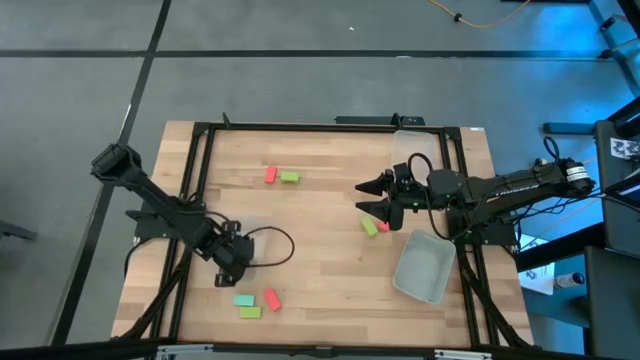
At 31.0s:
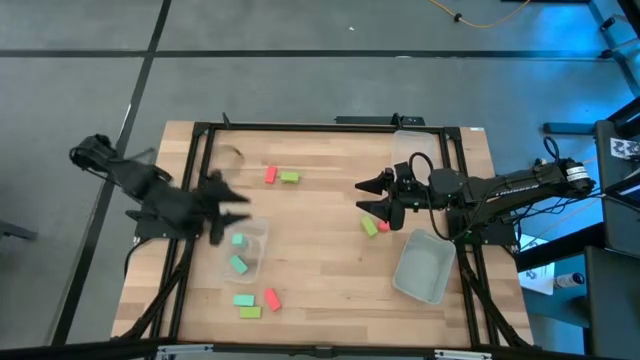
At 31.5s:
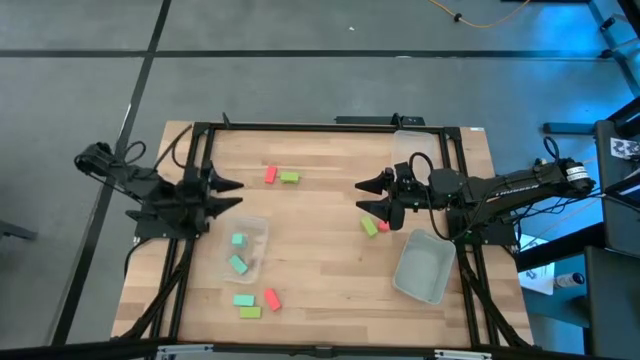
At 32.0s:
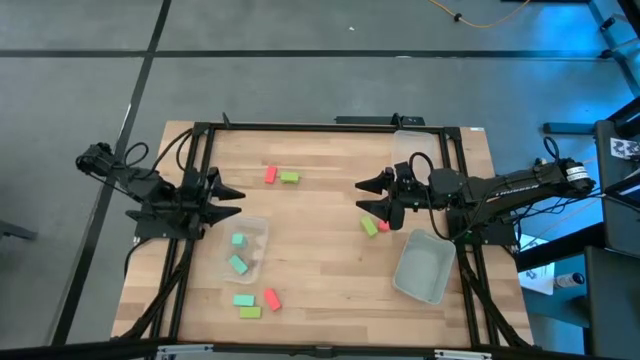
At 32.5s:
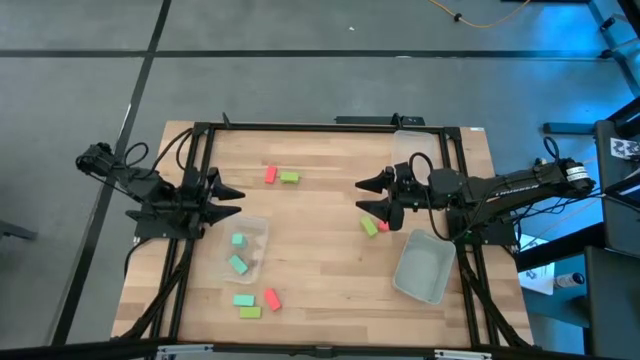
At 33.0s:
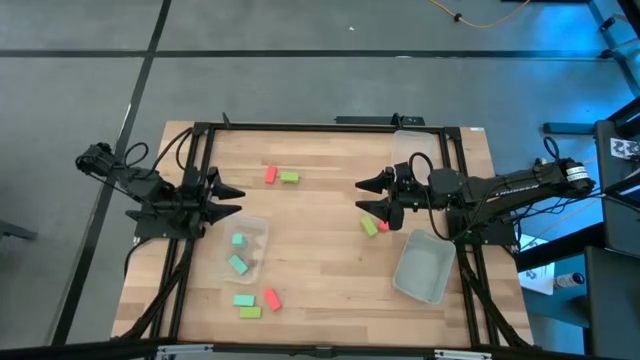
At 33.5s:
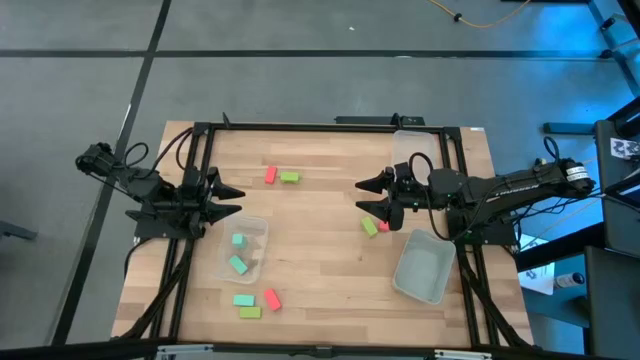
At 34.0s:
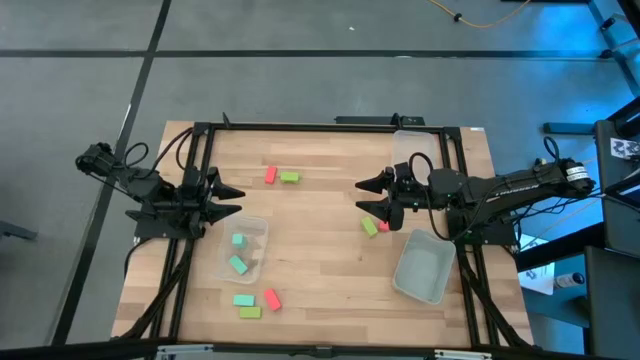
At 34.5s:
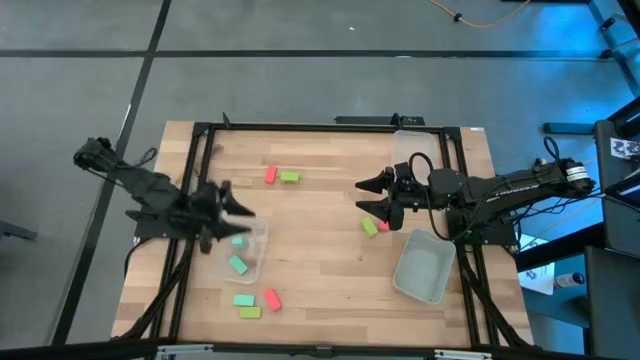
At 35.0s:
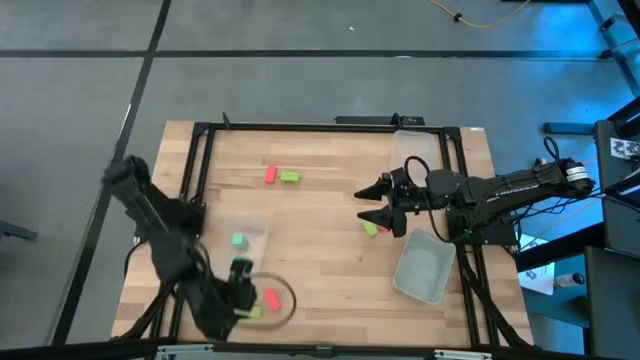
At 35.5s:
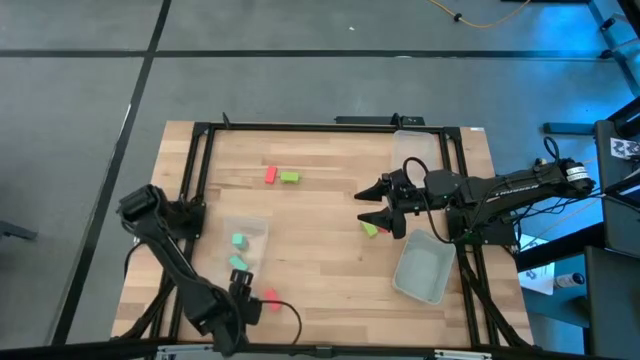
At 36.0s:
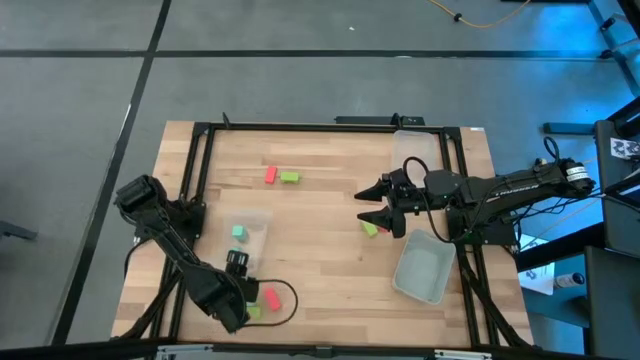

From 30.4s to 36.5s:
Task: Sort & place blocks by color
Adjust the left transparent bin

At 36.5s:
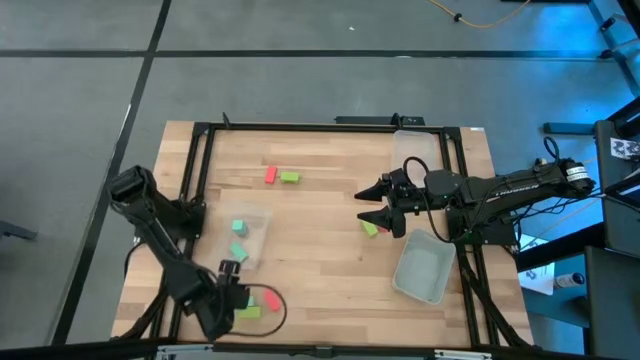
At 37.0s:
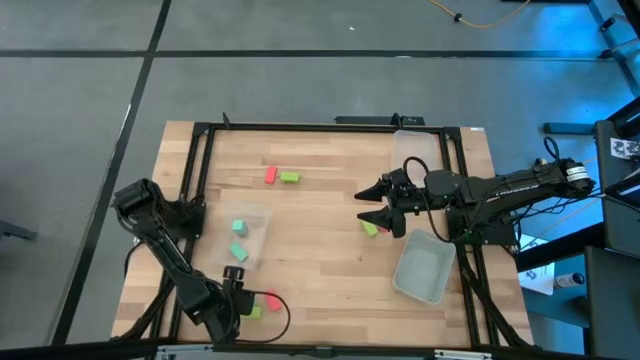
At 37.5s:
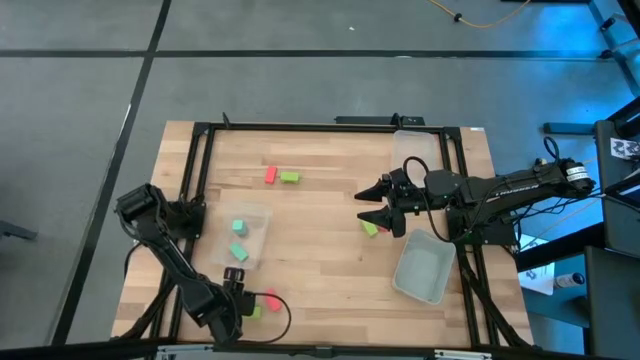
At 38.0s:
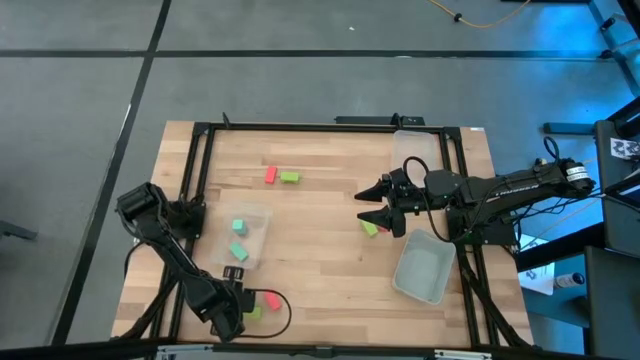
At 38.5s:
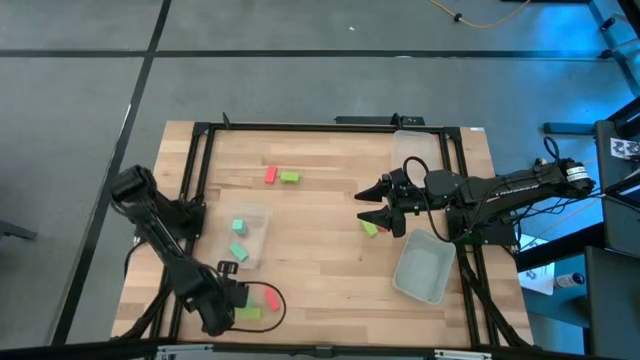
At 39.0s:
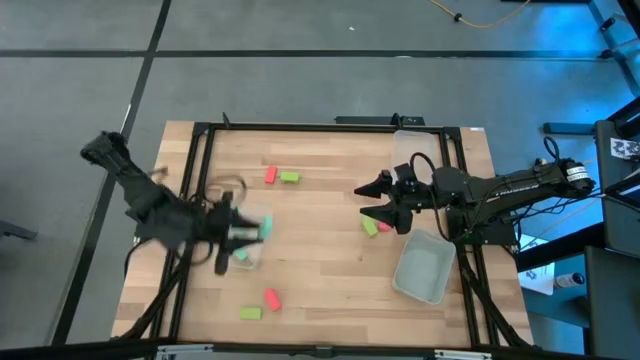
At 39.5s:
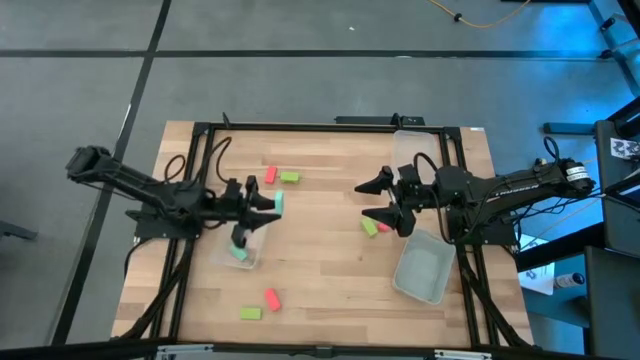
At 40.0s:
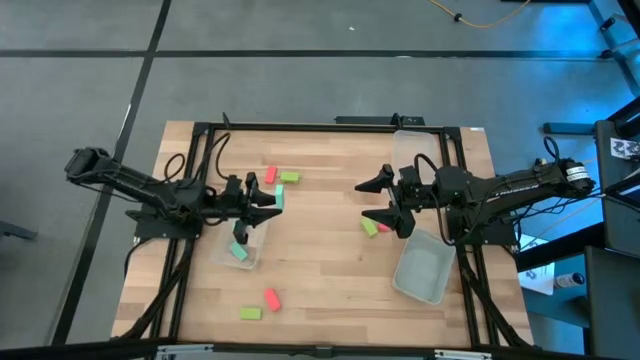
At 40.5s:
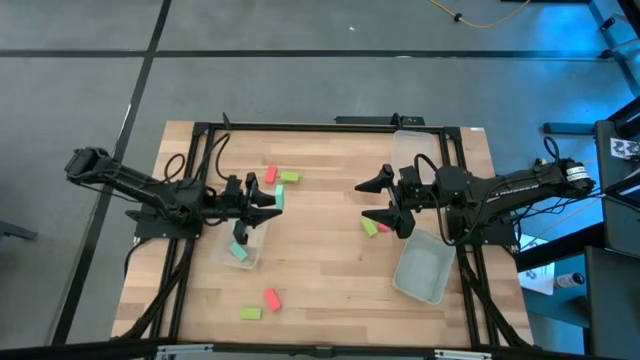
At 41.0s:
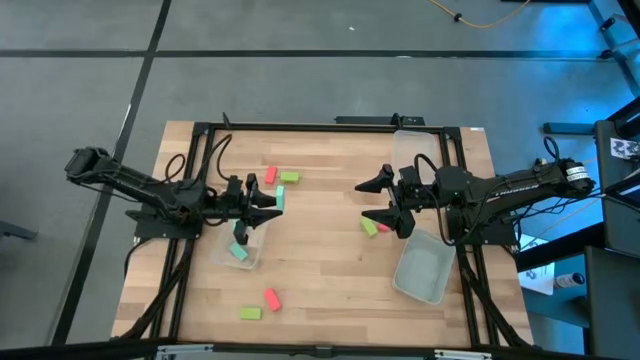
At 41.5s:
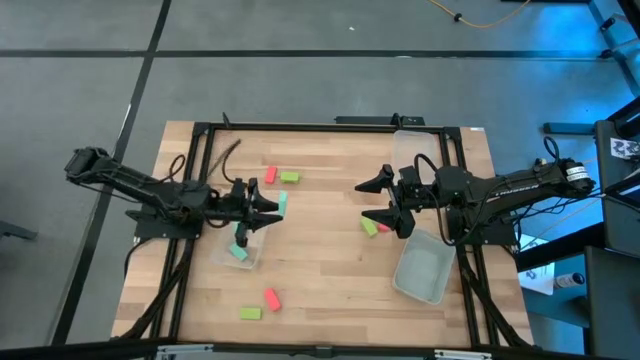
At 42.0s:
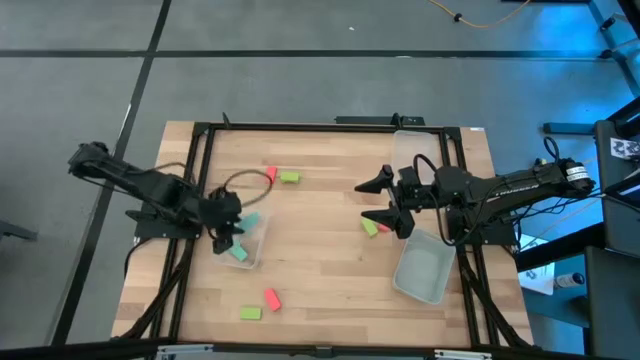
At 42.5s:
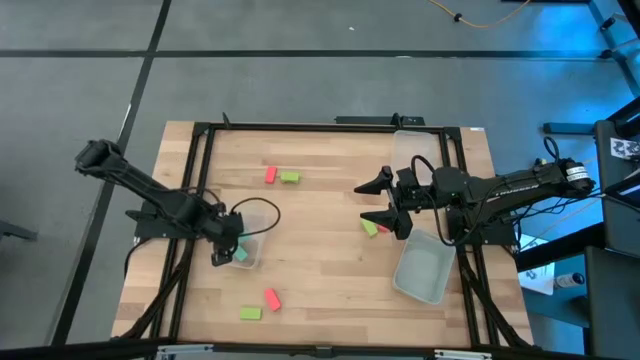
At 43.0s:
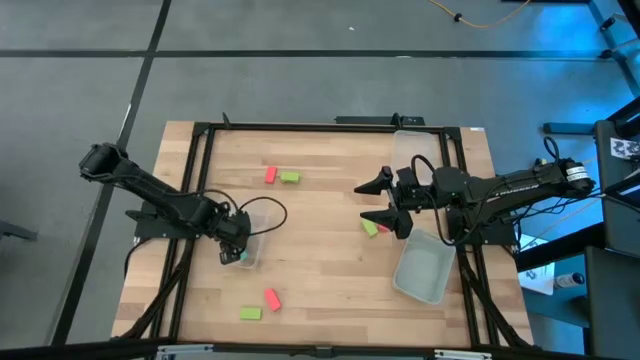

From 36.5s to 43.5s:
Put the blue block into the left transparent bin

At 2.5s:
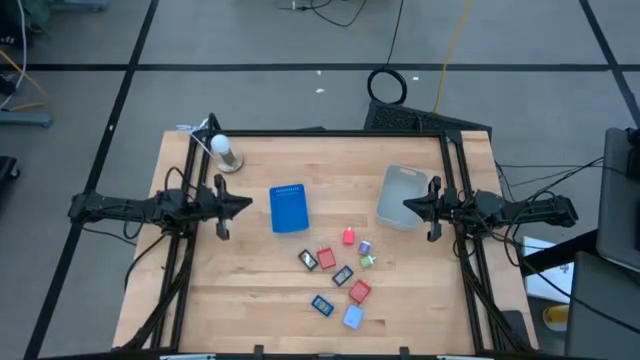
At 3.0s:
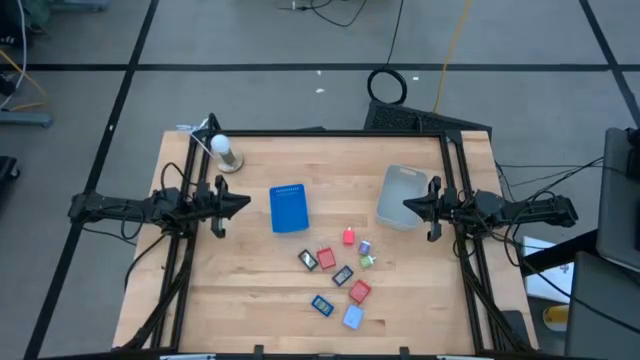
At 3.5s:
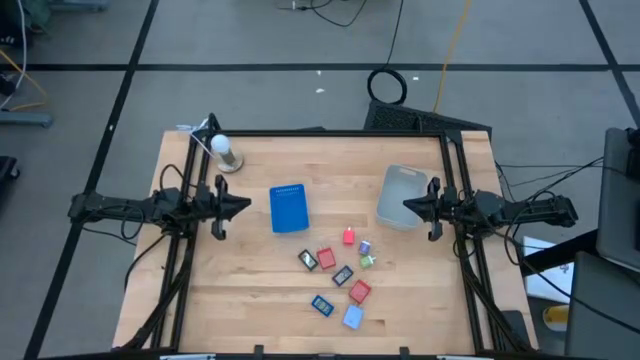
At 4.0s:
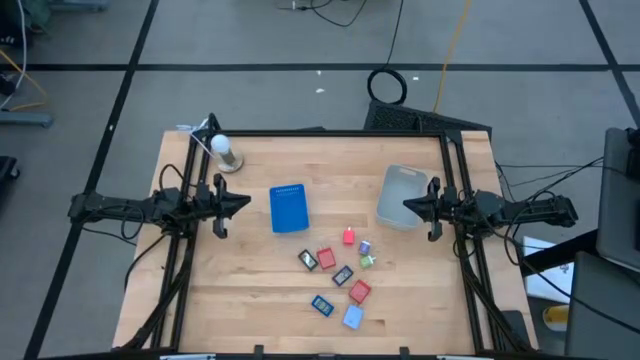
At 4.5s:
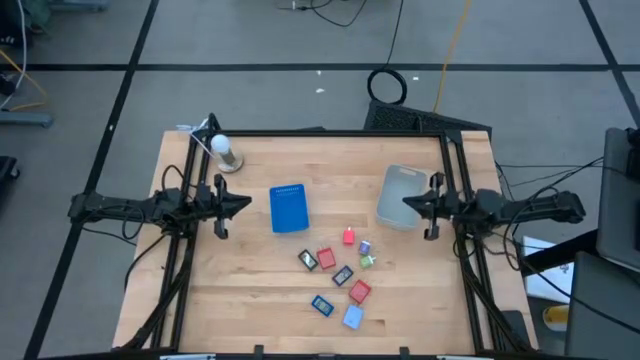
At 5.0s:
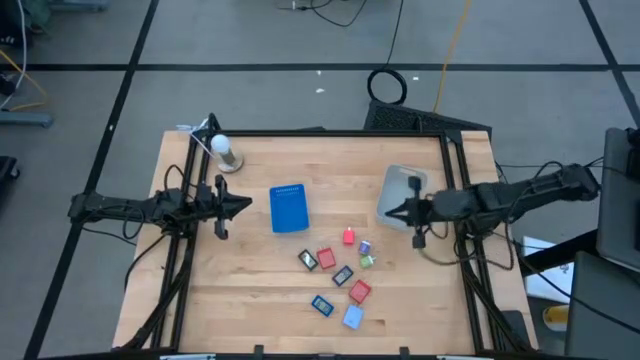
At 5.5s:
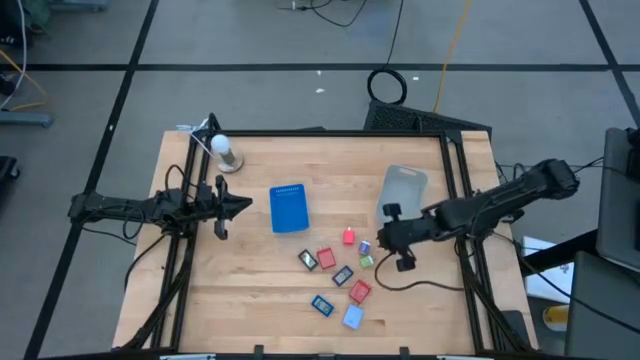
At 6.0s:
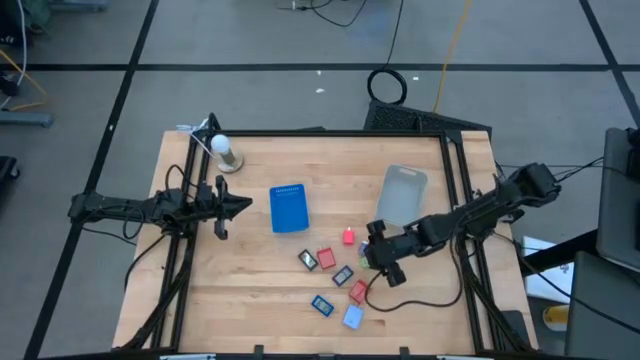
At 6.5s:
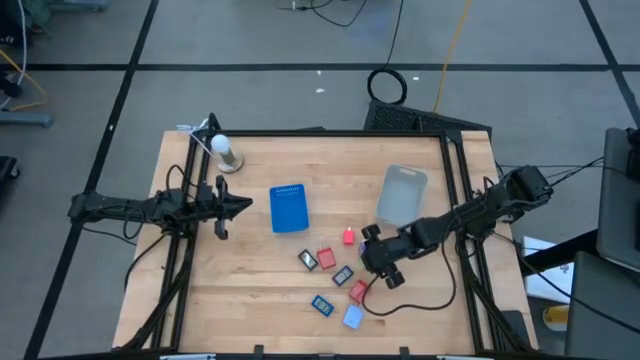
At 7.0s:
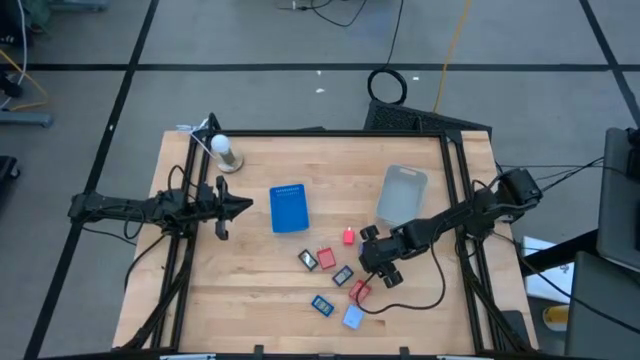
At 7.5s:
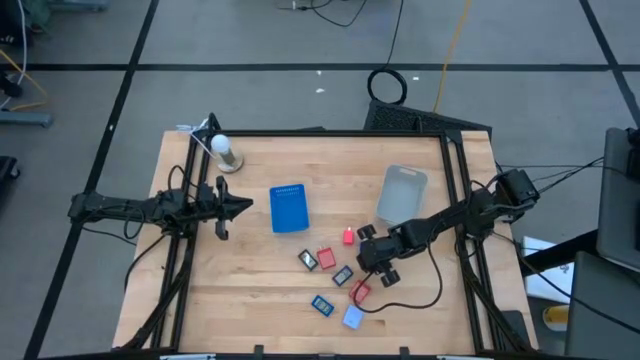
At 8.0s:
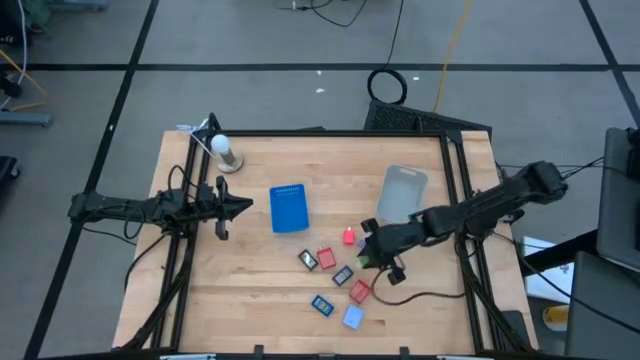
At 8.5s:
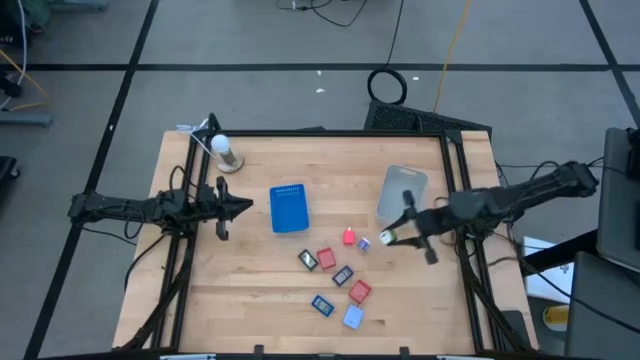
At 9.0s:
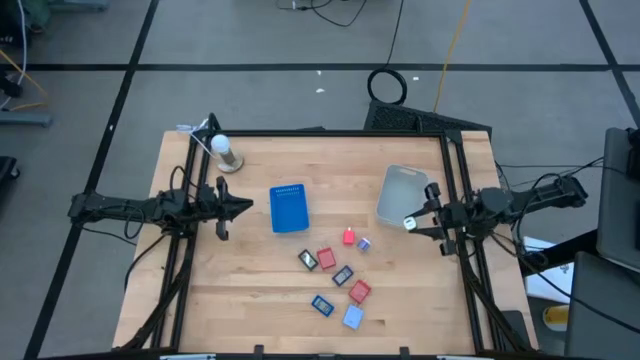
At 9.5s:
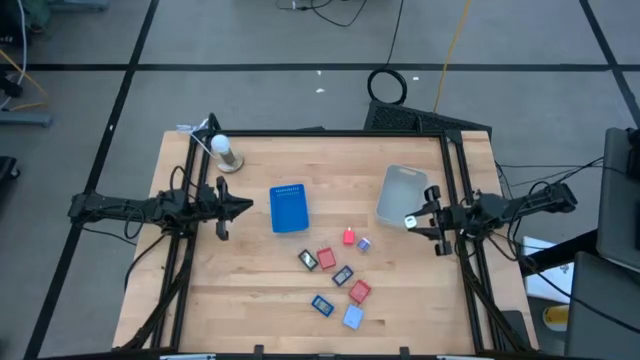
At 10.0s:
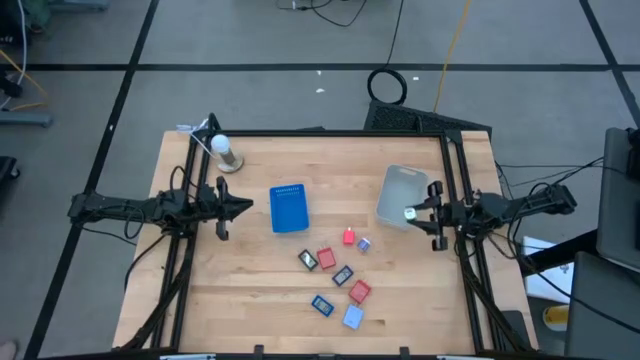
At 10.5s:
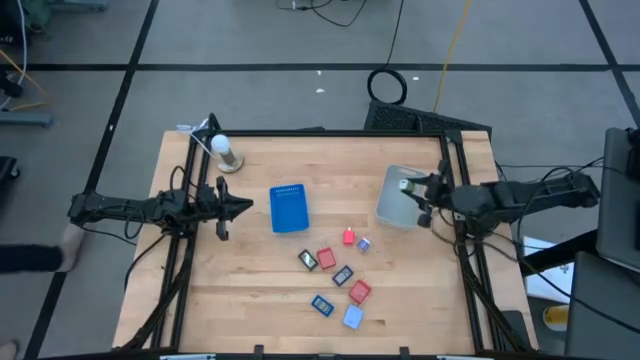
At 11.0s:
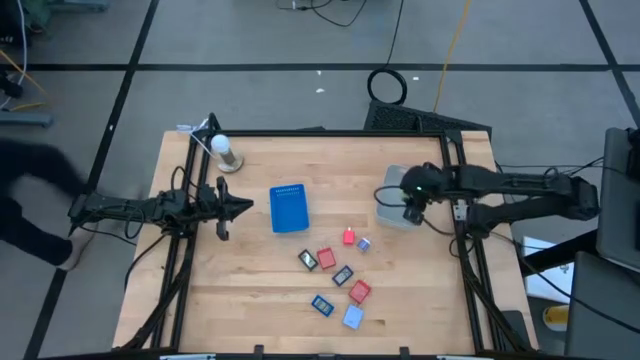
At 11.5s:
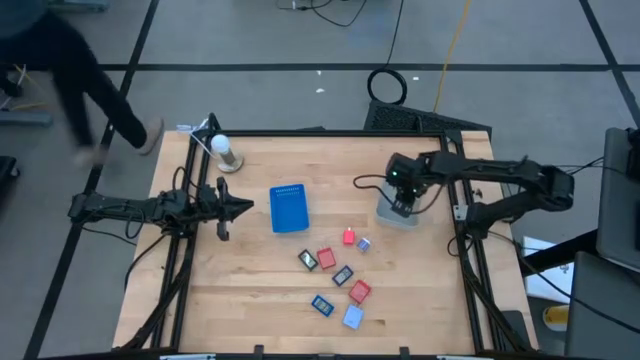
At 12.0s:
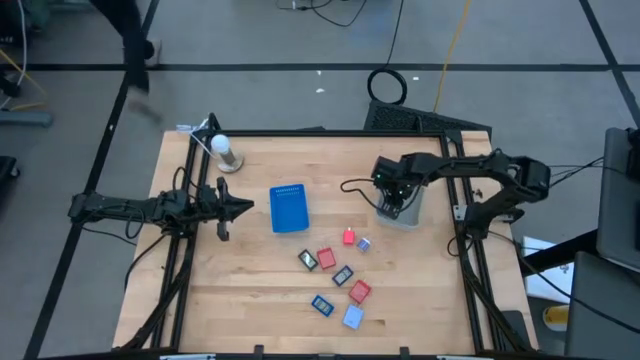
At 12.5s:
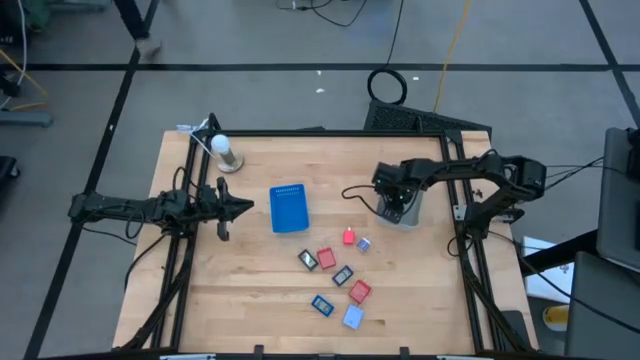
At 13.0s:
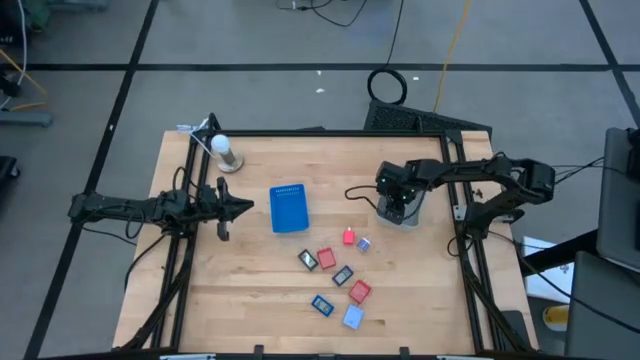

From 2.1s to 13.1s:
Task: Pick & Place Office items
Put the green charger adapter into the white bin
